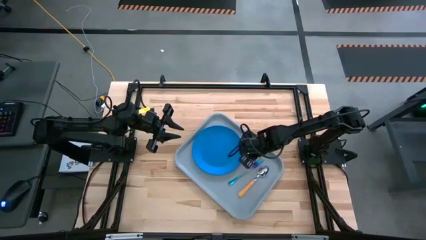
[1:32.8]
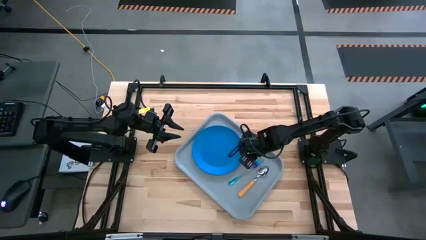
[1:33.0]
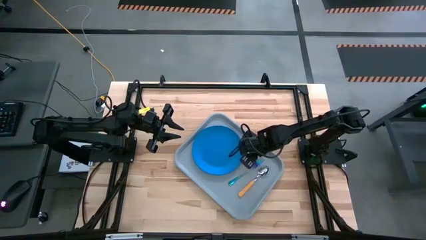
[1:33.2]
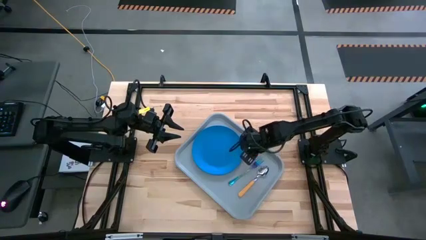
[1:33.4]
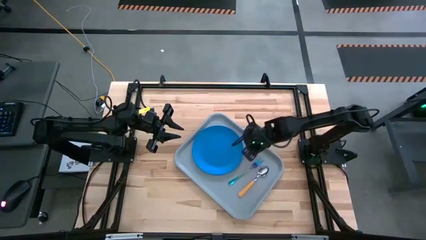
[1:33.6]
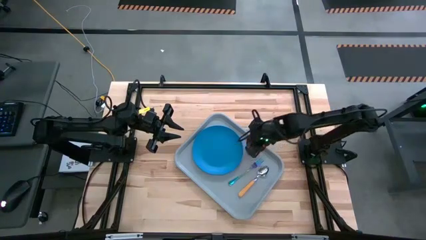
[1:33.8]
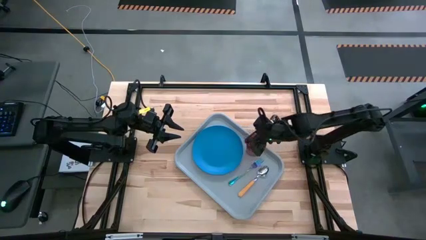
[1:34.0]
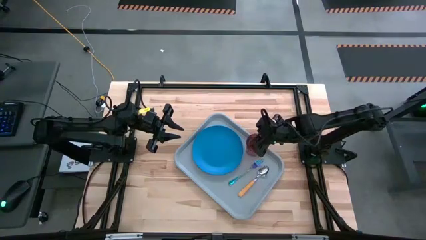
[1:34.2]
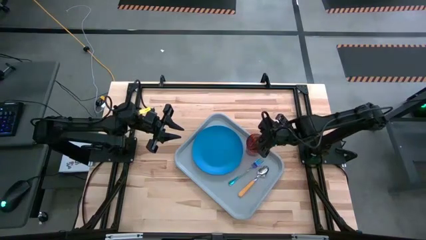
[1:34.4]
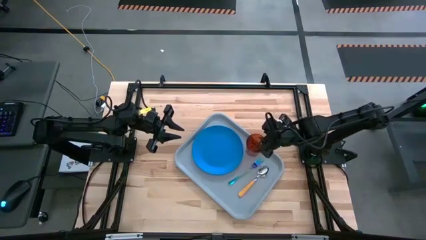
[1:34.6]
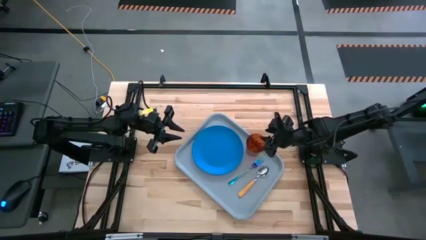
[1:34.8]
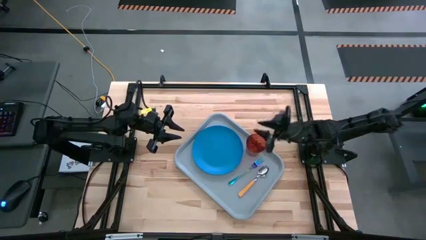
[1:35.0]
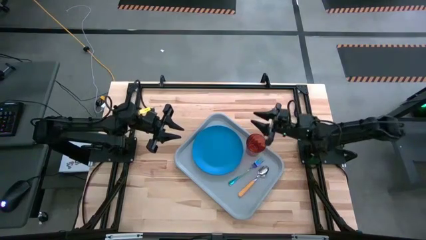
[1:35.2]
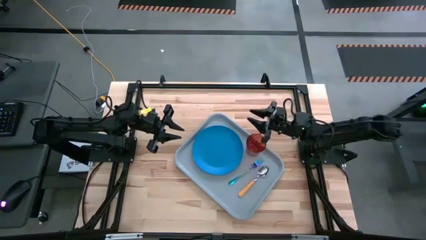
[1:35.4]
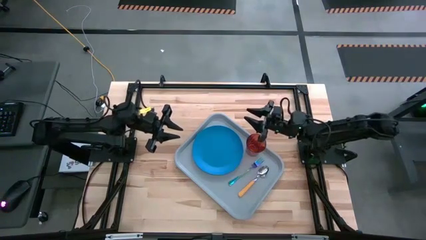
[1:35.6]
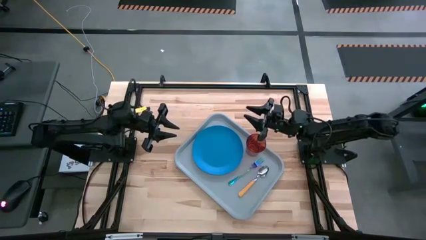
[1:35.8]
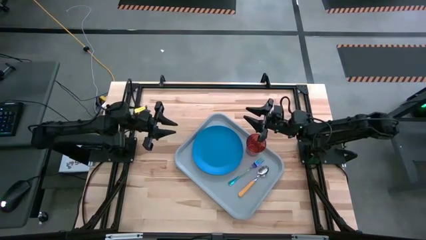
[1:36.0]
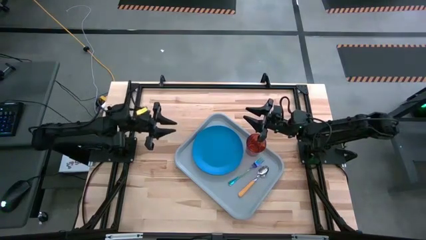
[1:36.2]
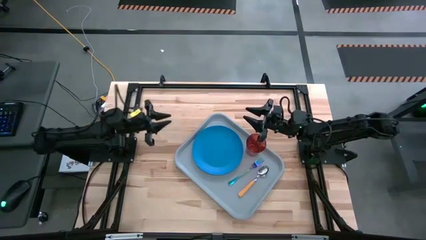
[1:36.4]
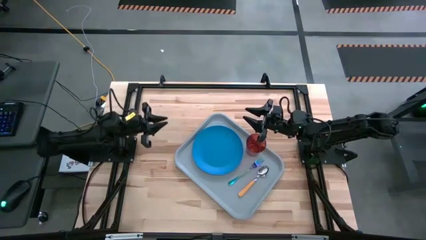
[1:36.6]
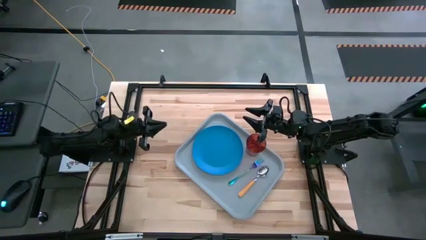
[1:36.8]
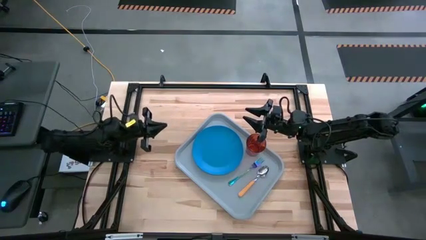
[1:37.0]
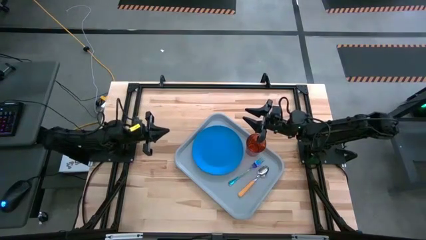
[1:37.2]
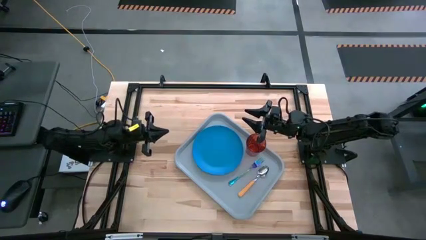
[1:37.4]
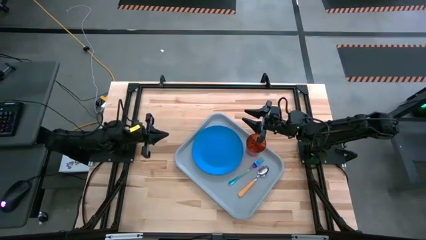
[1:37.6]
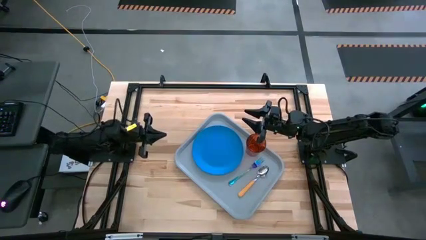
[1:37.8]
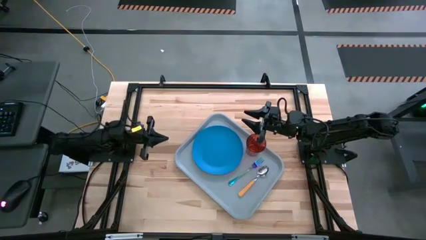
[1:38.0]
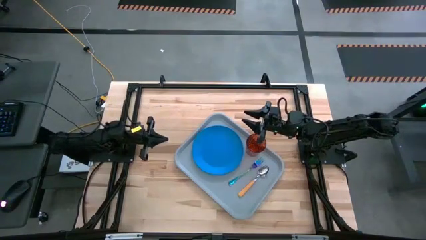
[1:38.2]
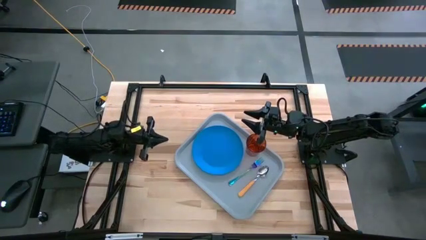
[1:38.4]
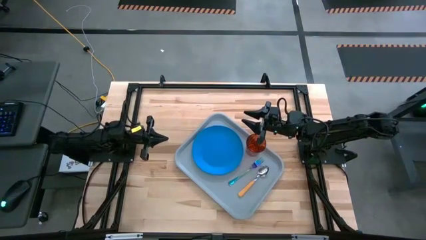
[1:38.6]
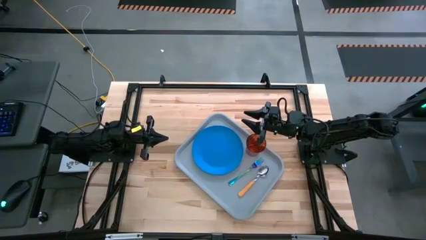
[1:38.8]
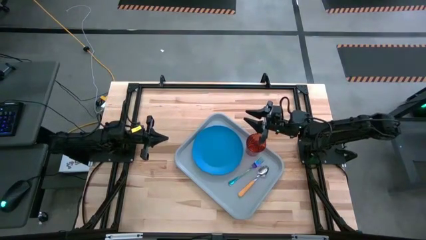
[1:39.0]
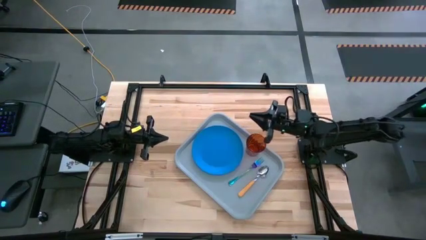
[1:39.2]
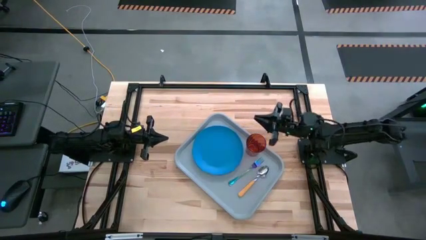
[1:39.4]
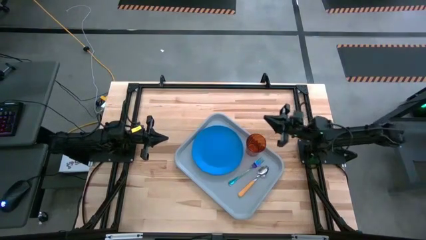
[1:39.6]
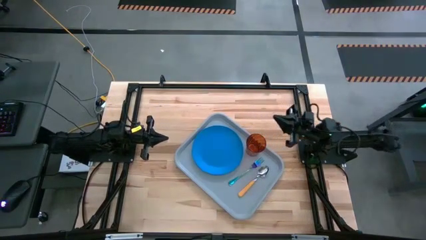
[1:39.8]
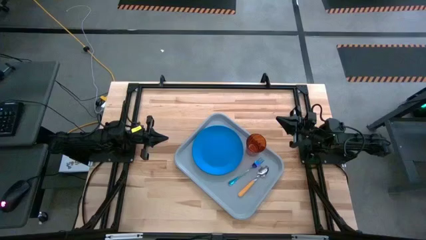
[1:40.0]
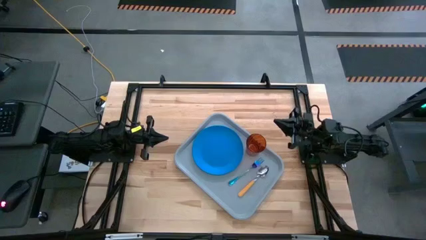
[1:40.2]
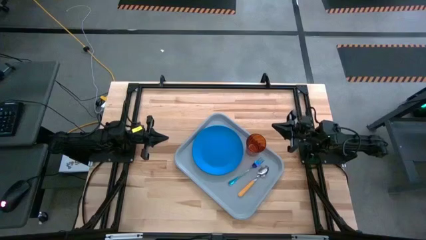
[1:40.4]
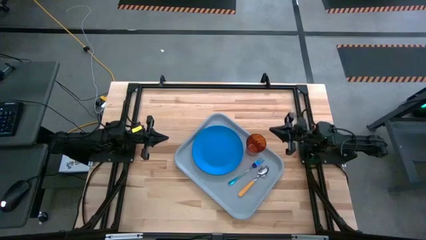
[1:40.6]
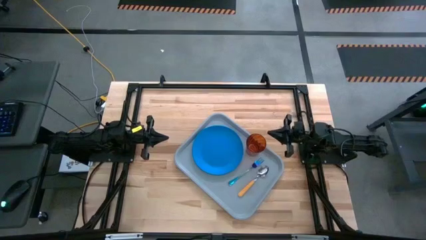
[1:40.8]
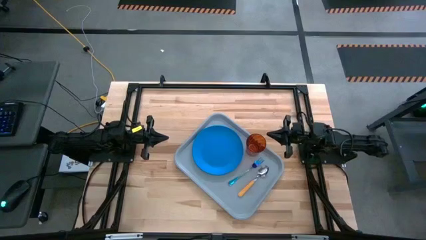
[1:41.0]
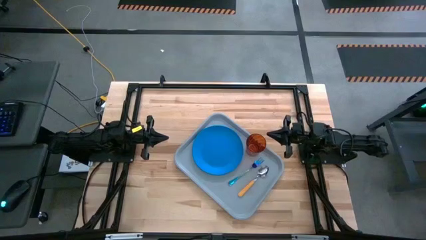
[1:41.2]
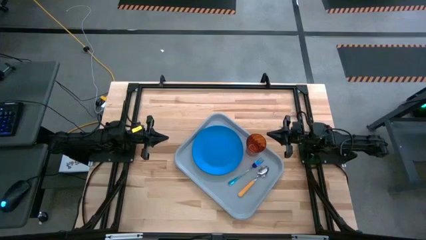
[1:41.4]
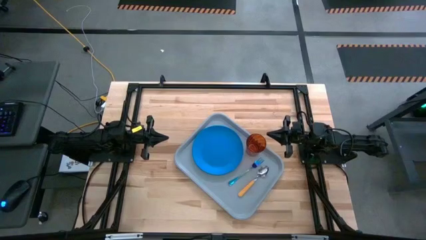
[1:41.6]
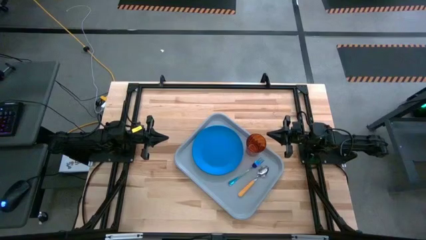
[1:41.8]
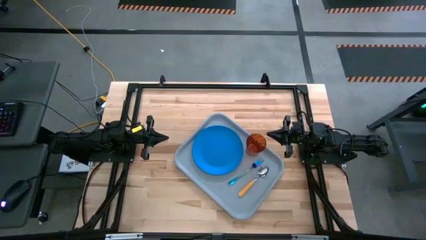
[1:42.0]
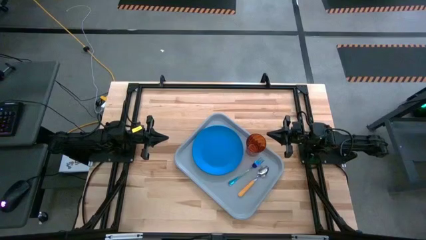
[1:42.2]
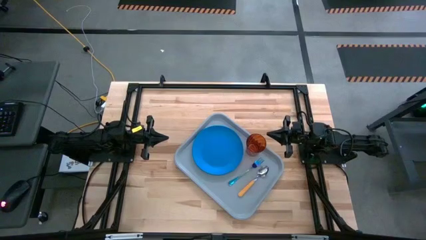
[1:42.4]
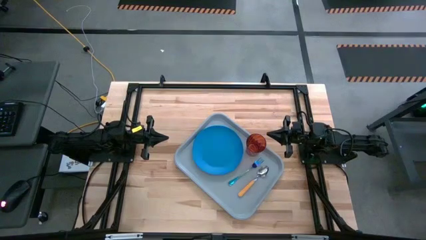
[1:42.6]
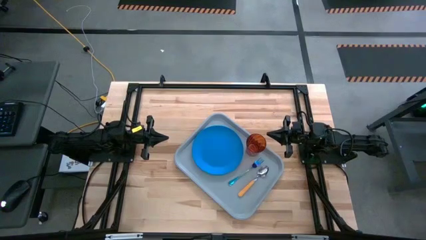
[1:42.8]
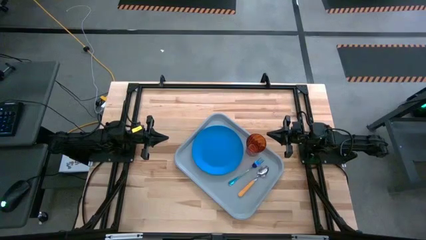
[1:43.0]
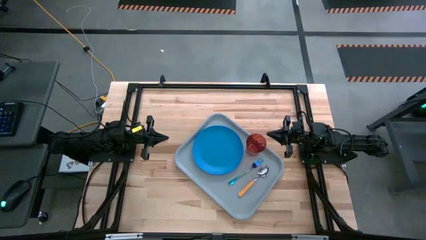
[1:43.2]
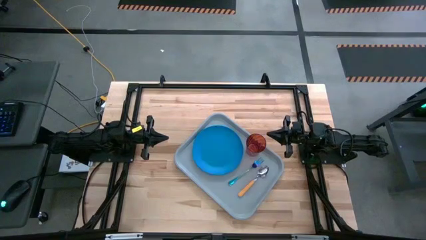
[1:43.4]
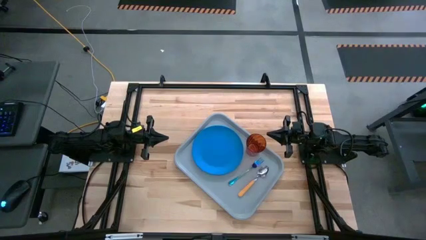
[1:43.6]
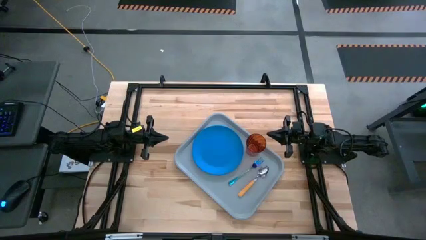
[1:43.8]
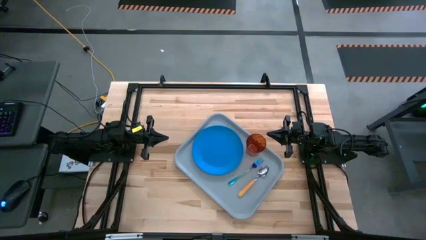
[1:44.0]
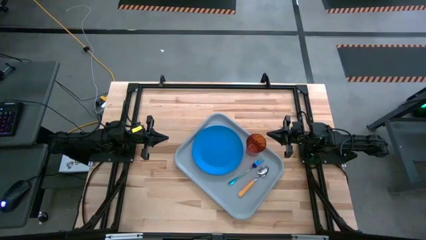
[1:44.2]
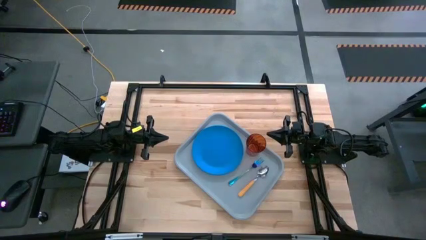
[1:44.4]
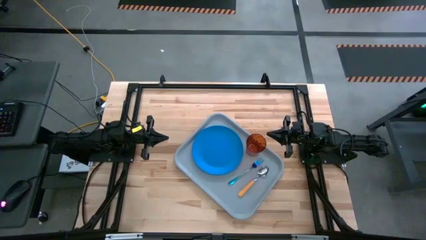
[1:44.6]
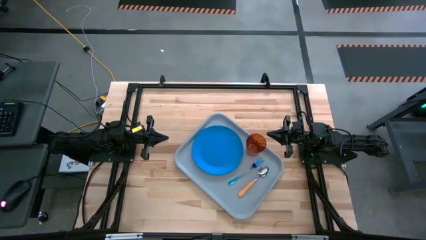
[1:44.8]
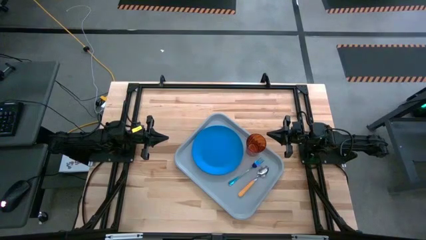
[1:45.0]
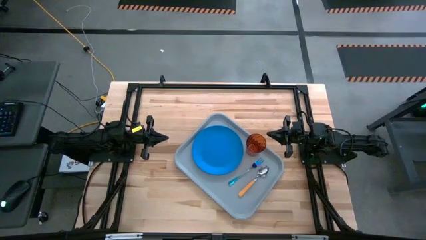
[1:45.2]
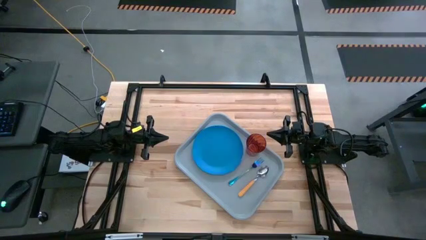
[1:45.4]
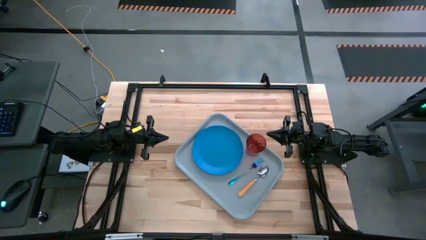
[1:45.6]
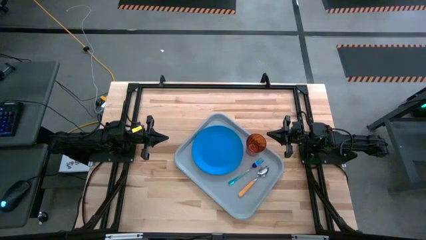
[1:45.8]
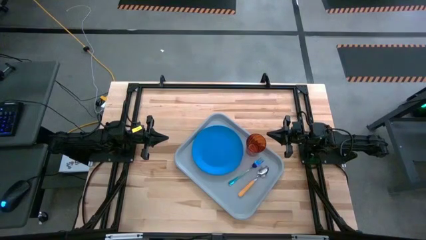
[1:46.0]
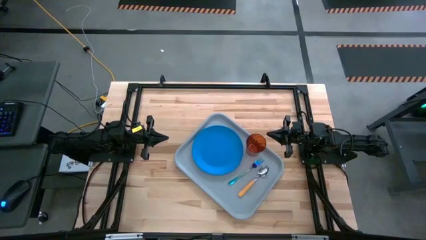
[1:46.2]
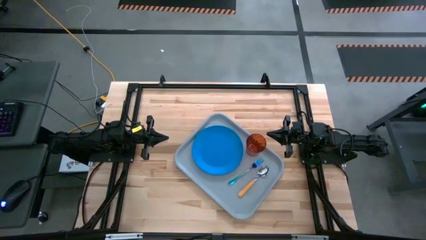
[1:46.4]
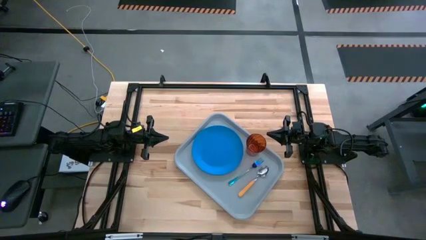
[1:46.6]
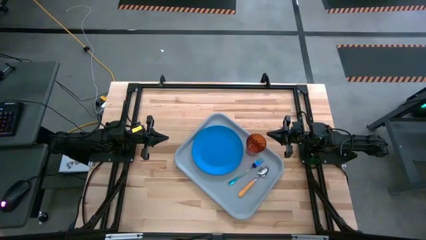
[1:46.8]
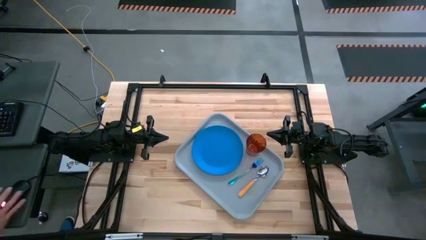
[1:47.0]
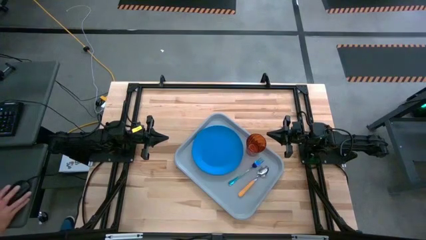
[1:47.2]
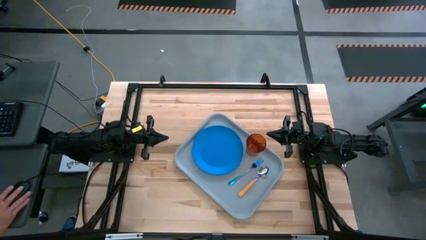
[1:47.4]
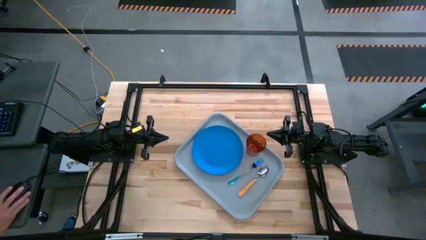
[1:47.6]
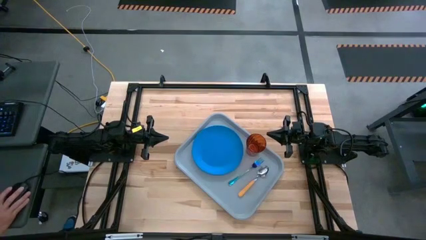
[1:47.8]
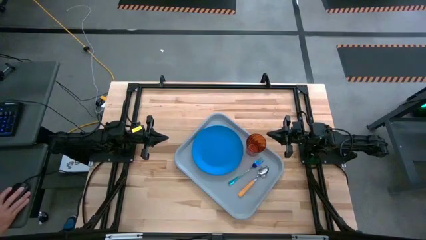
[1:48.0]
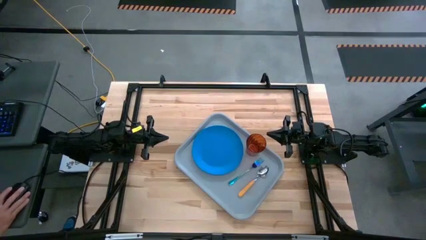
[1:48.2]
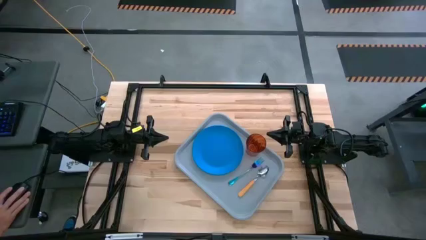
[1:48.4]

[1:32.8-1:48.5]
Task: Pick and place plate/cup/fork/spoon on tray
Return to Home Position
